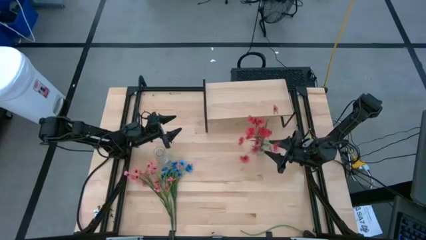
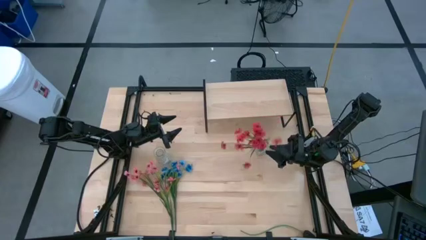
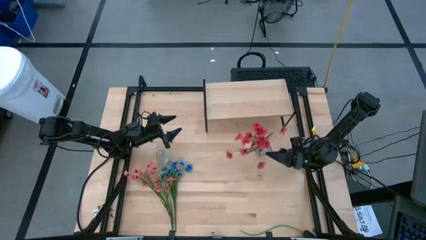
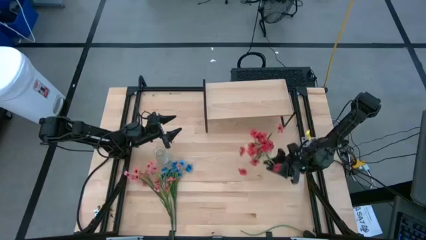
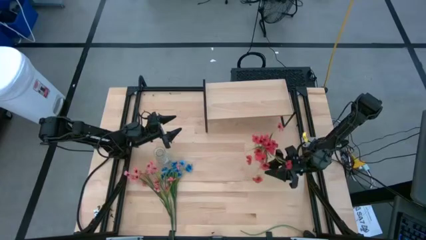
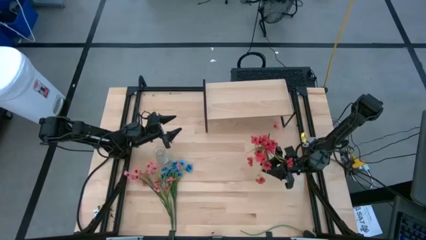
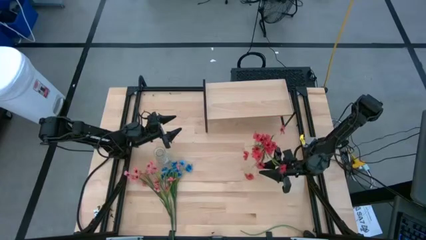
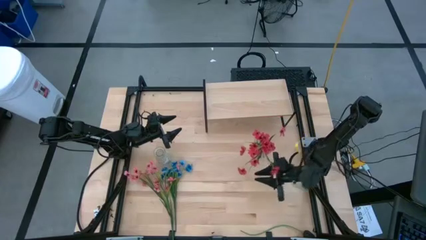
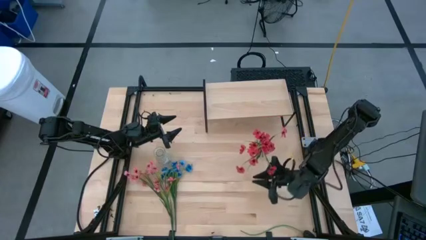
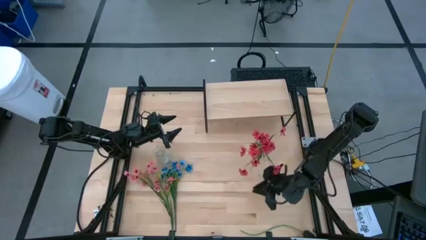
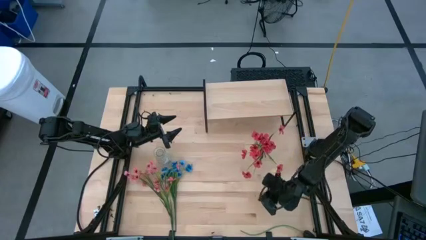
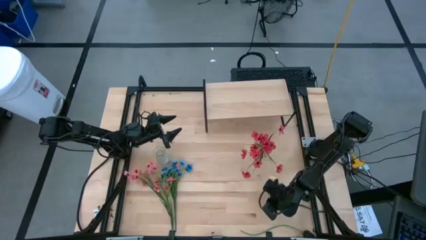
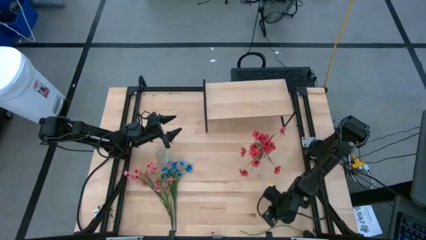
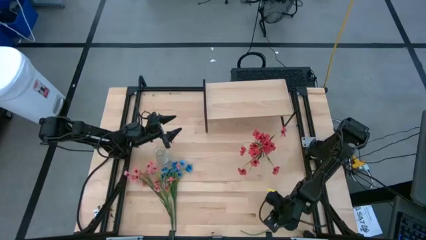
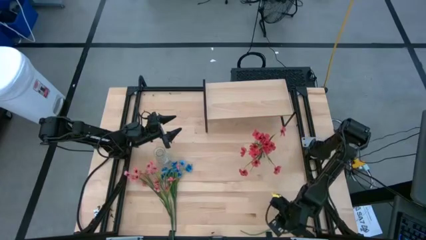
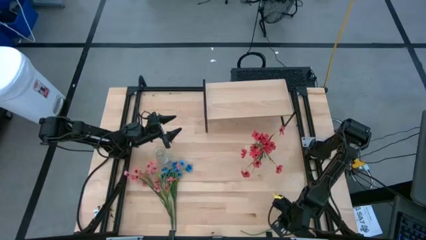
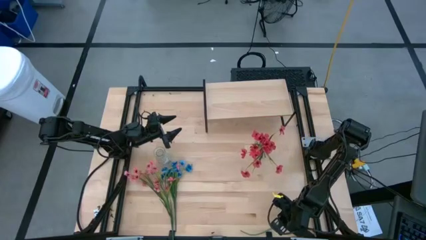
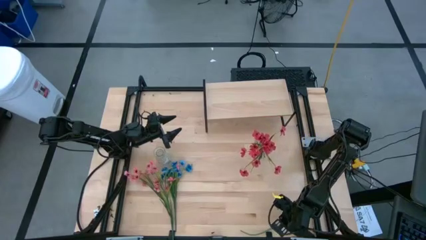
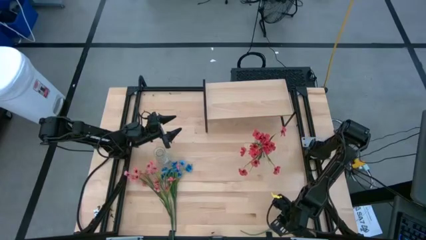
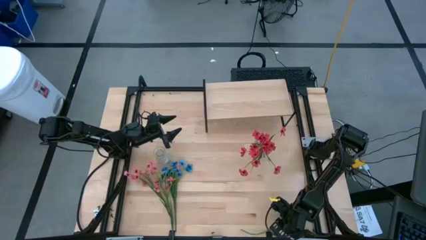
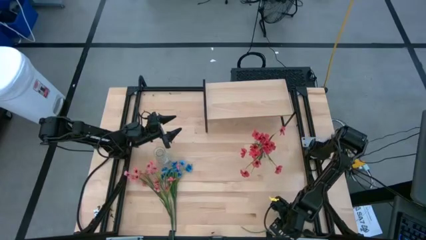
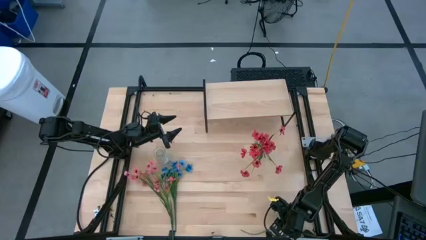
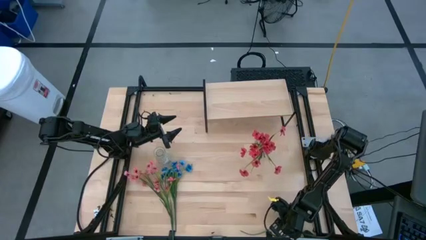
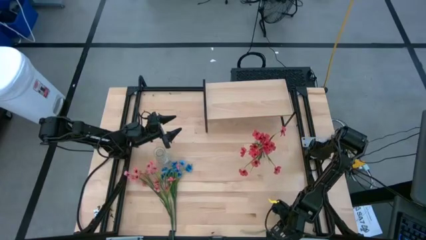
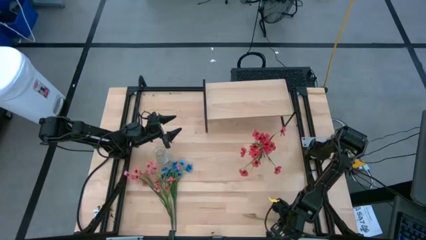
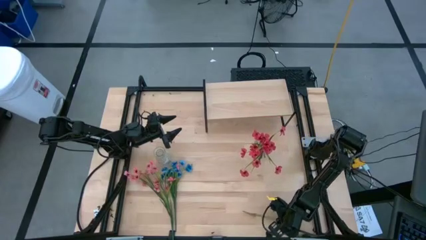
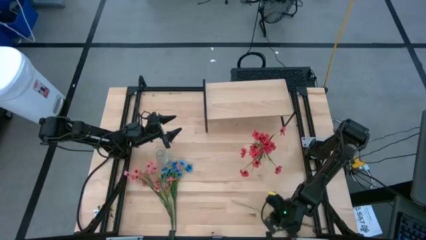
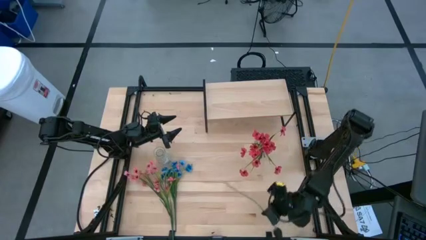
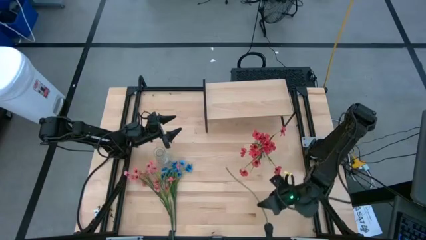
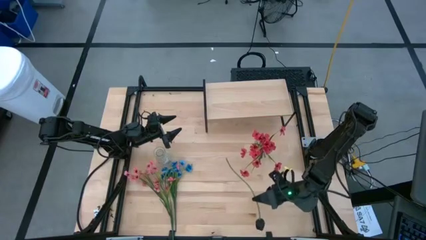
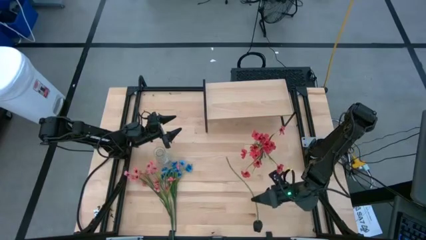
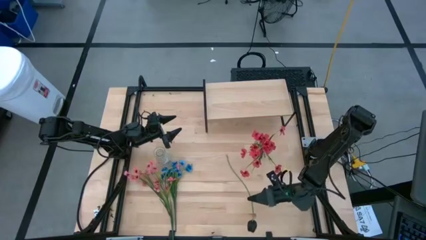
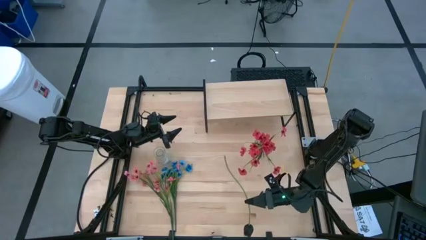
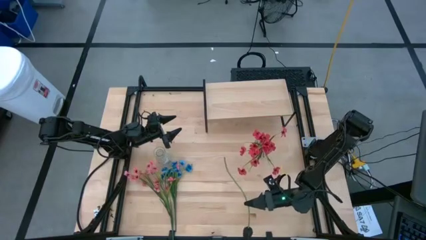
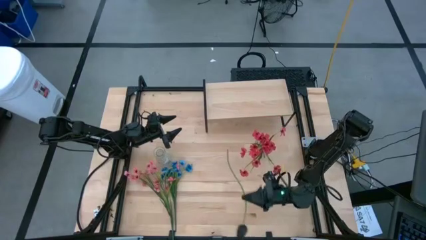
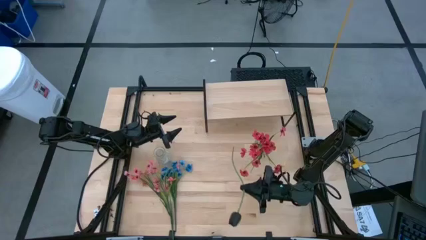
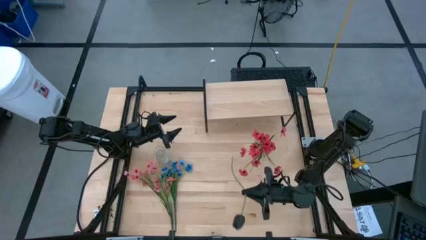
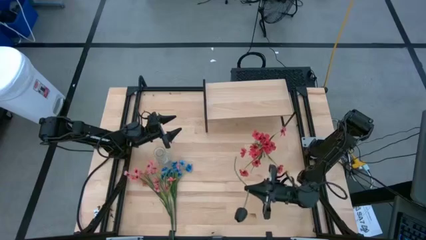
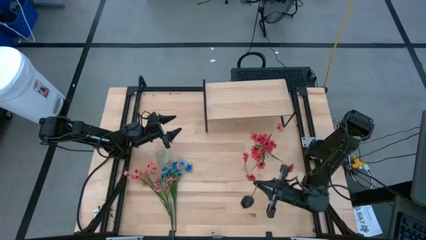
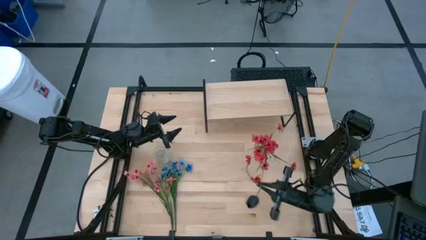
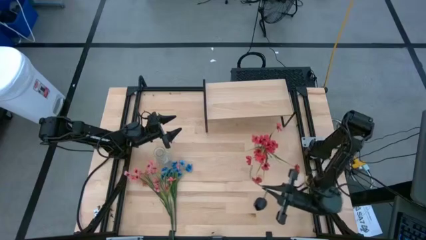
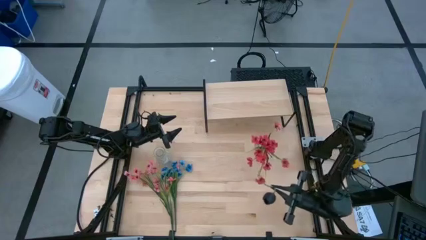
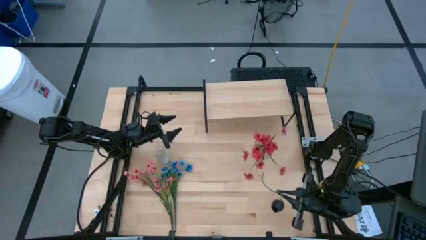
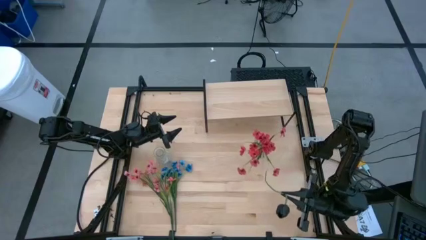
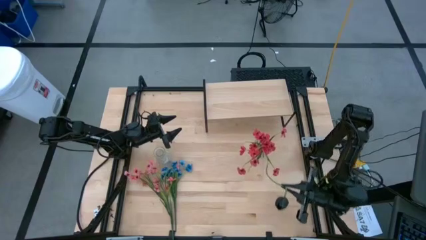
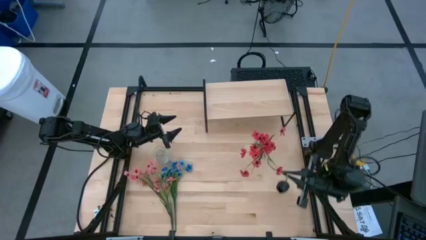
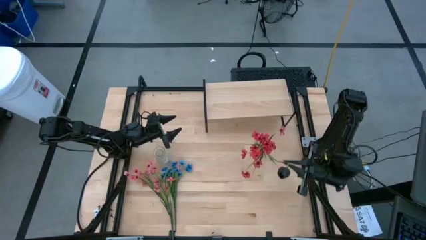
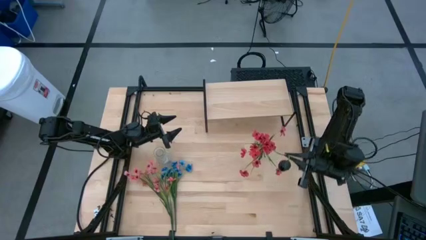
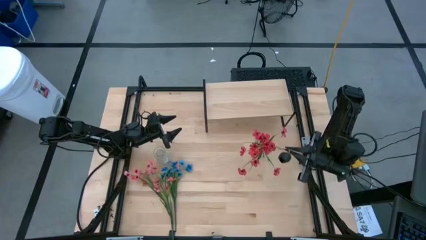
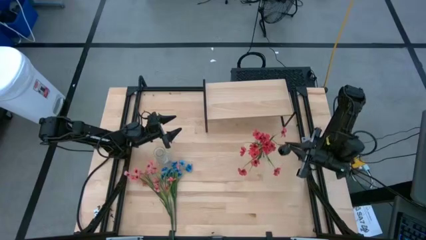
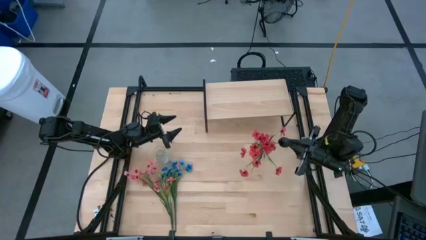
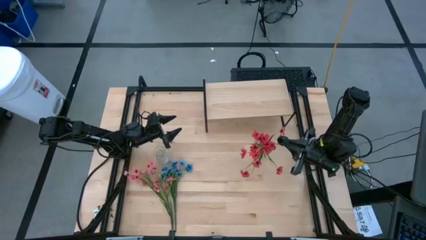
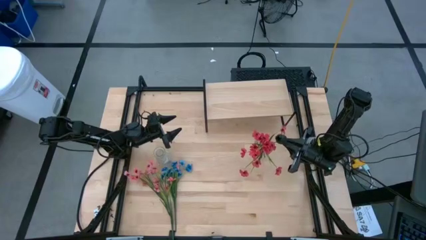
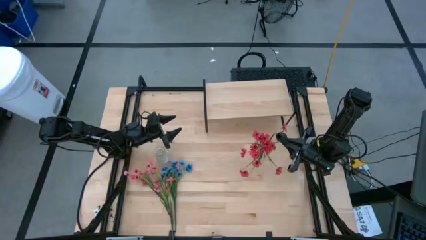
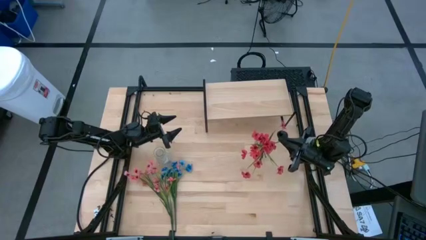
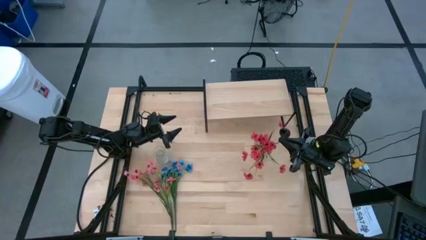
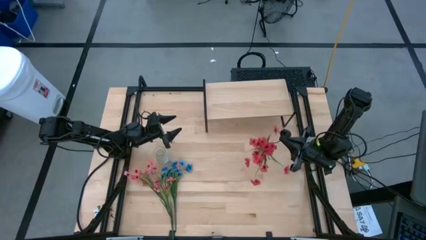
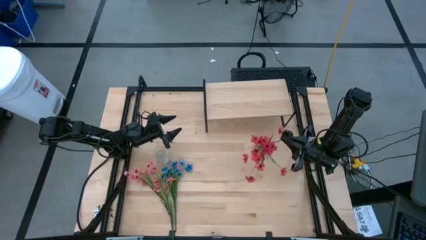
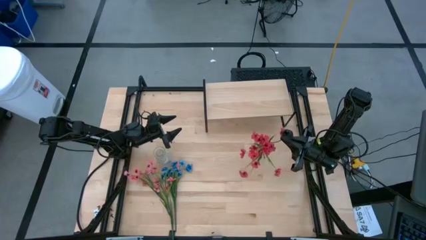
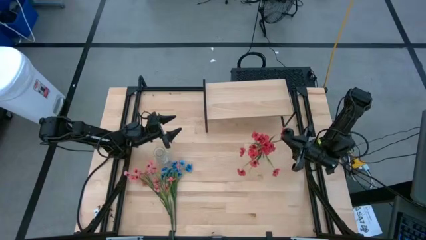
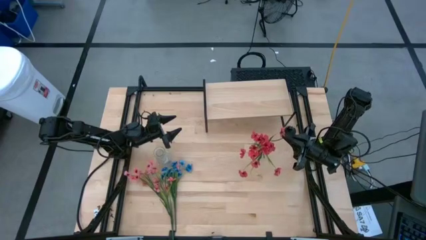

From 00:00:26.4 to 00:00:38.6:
Task: Pick and place flowers into a vace then onto a shelf
Put the black tulip into the right transparent vase

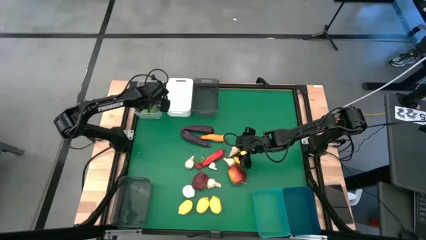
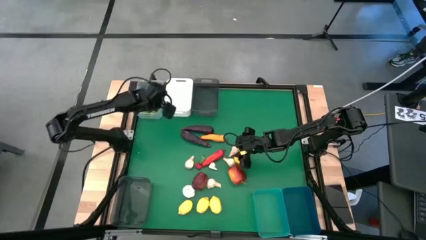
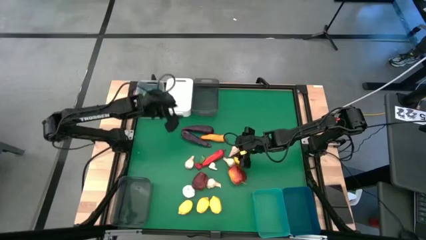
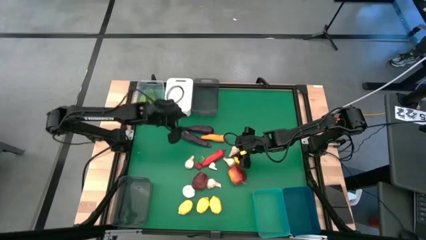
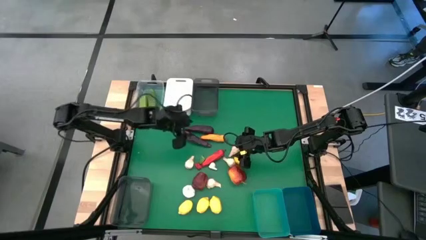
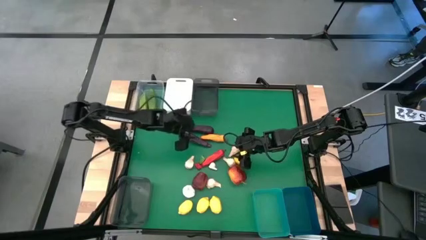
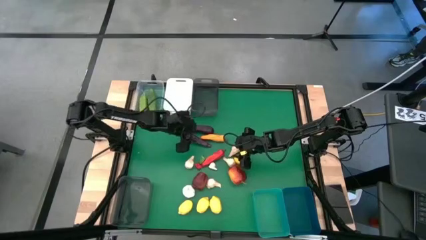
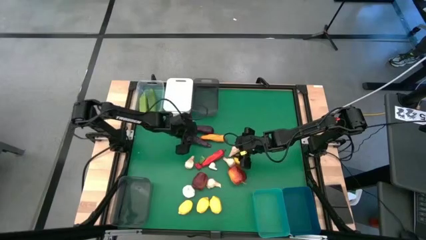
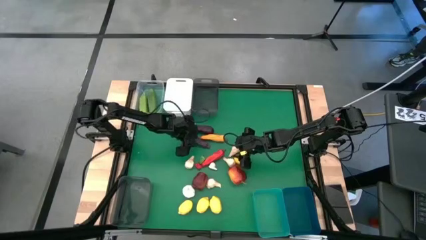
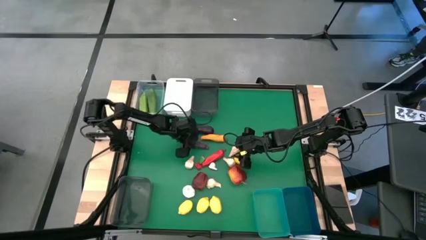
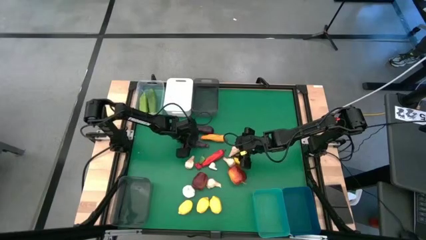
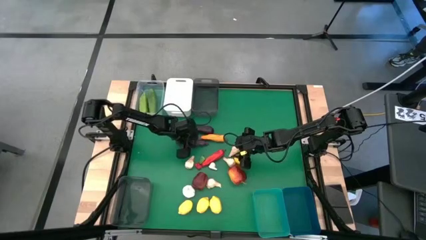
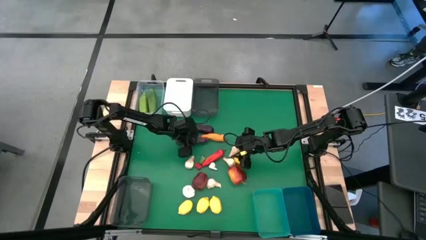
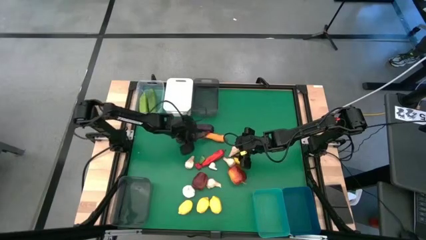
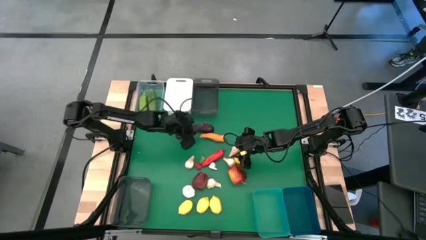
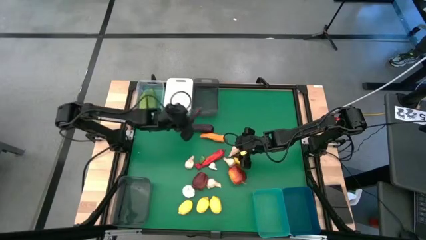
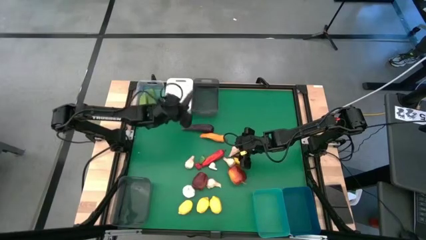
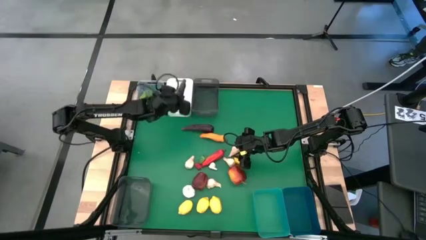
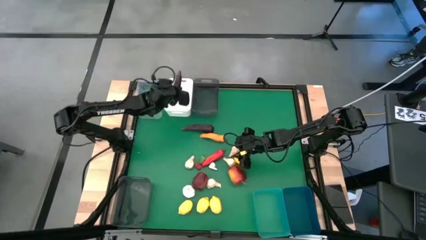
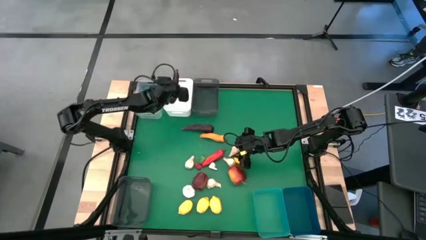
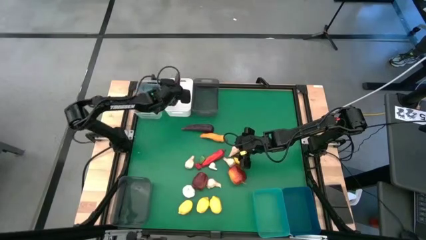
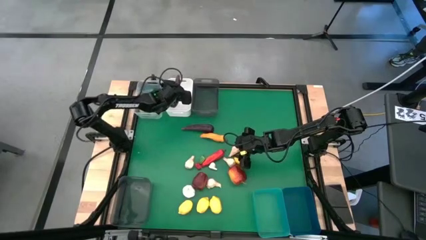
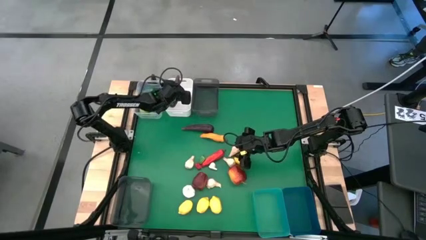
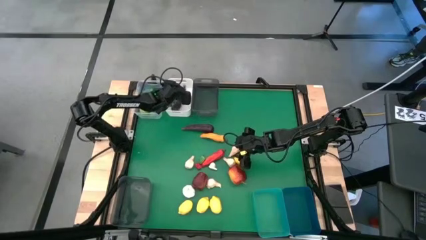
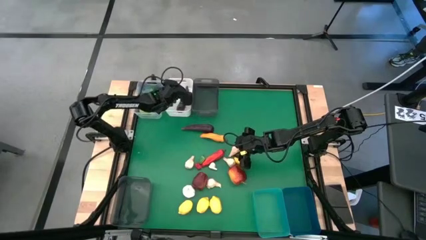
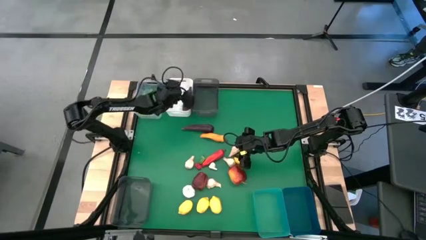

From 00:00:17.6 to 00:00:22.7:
Task: Sort produce into baskets
Put the purple eggplant into the white bin
